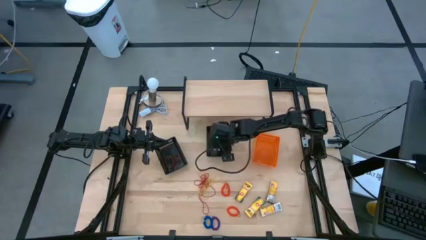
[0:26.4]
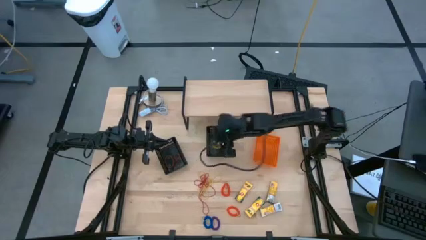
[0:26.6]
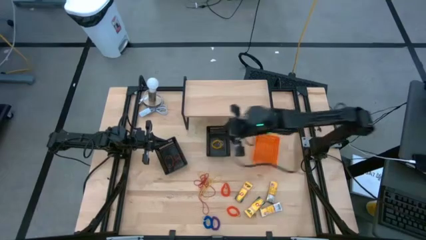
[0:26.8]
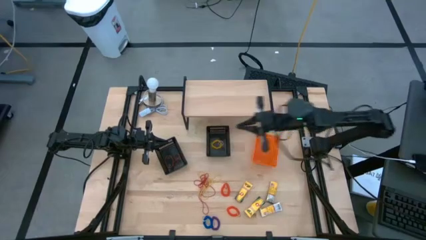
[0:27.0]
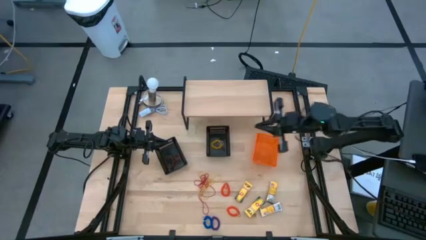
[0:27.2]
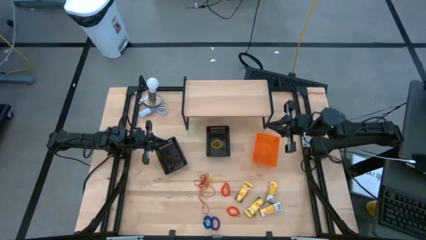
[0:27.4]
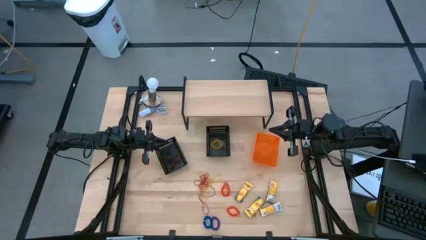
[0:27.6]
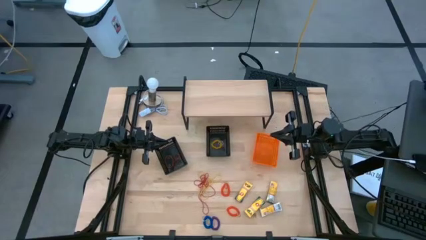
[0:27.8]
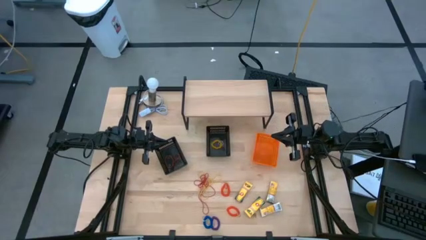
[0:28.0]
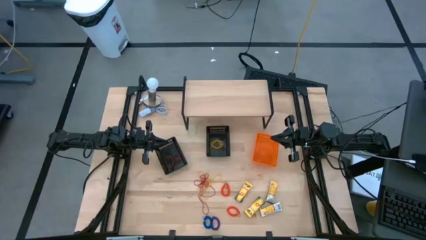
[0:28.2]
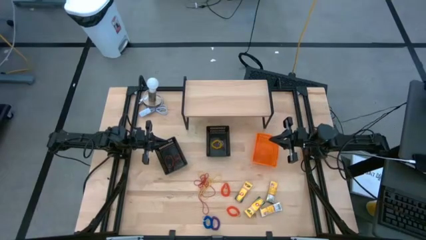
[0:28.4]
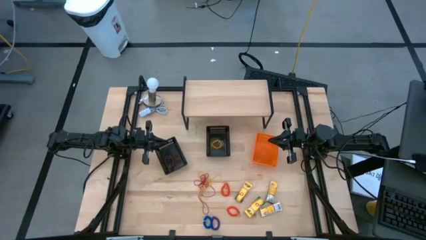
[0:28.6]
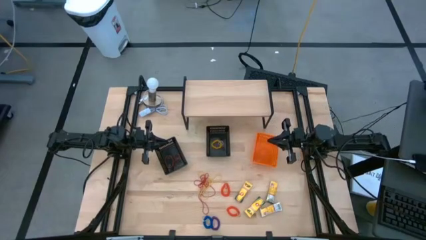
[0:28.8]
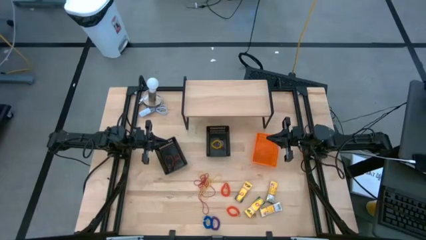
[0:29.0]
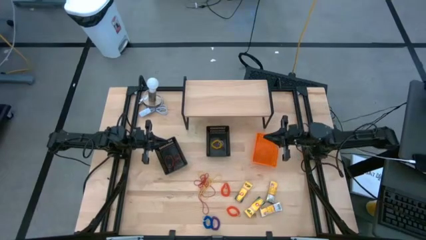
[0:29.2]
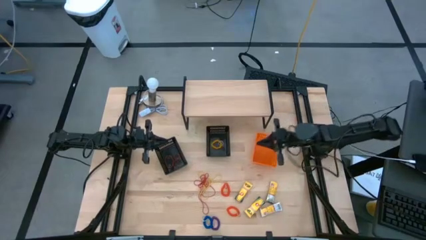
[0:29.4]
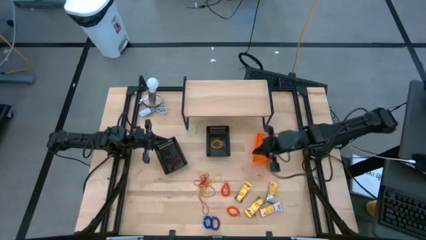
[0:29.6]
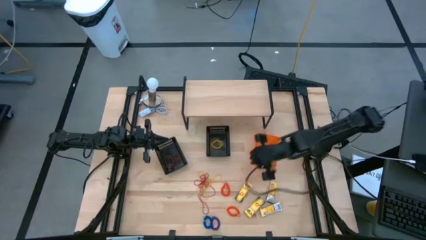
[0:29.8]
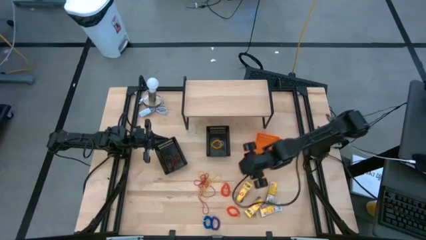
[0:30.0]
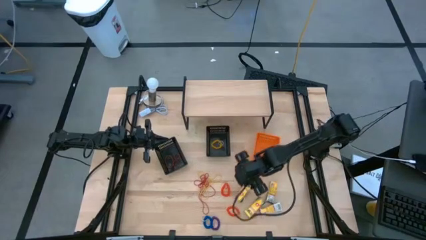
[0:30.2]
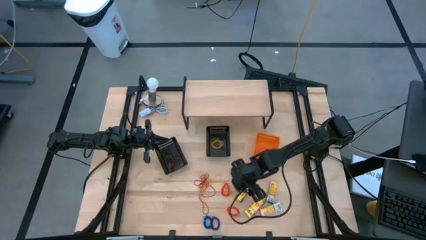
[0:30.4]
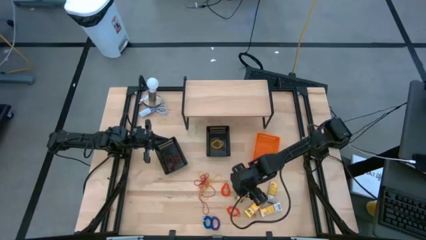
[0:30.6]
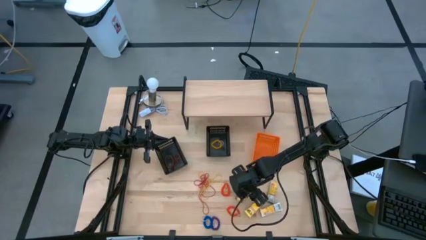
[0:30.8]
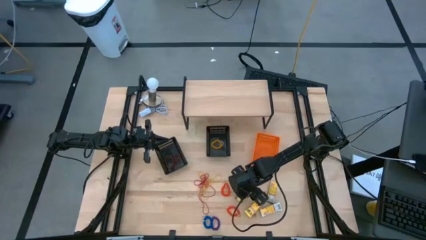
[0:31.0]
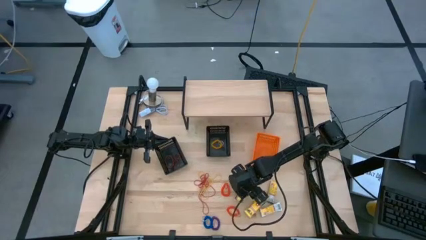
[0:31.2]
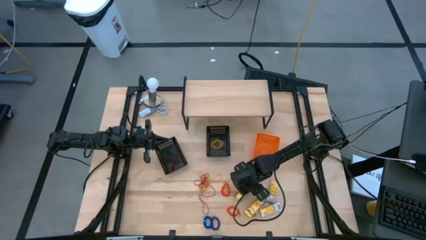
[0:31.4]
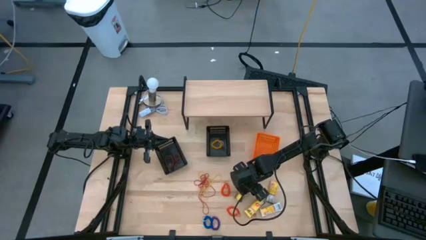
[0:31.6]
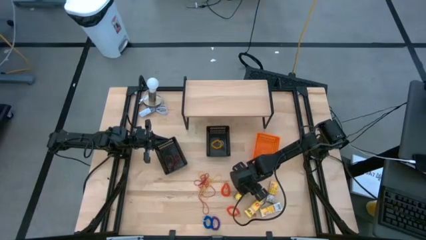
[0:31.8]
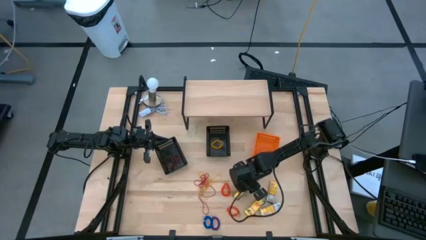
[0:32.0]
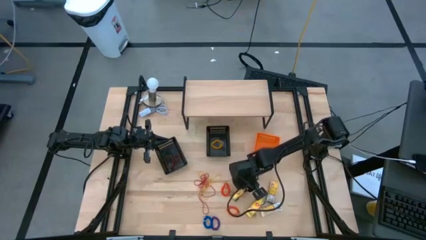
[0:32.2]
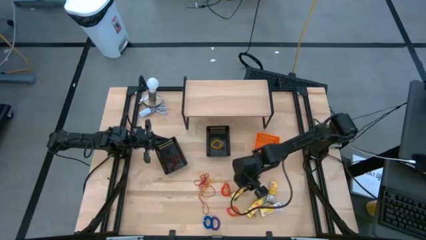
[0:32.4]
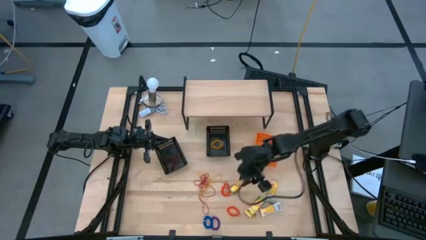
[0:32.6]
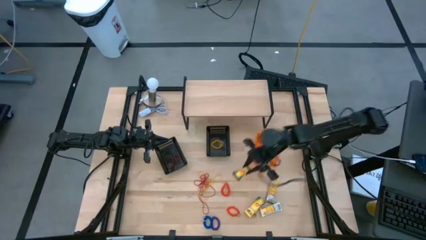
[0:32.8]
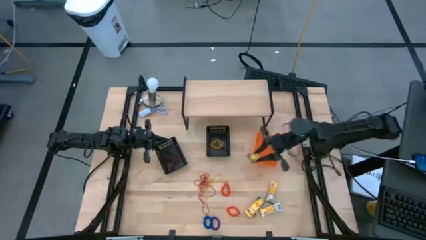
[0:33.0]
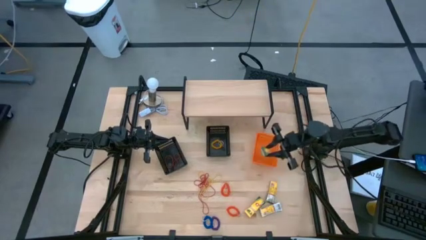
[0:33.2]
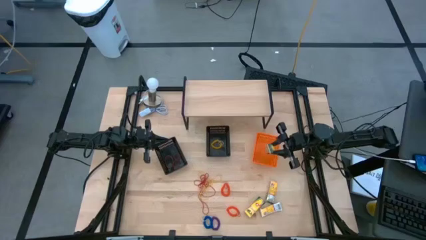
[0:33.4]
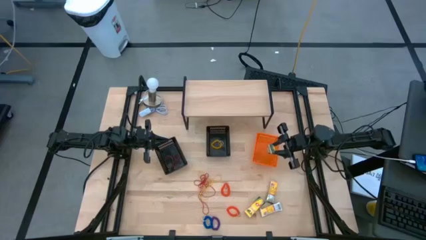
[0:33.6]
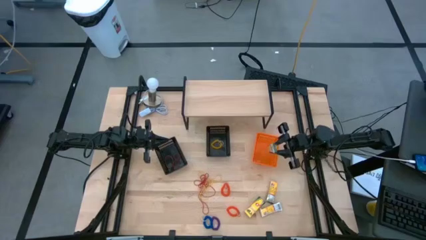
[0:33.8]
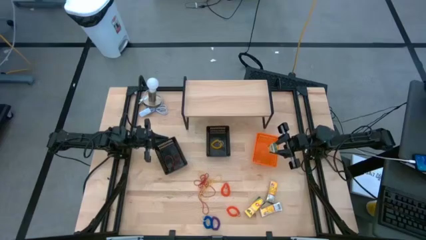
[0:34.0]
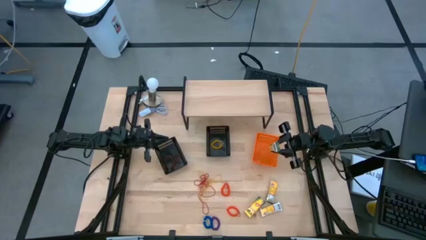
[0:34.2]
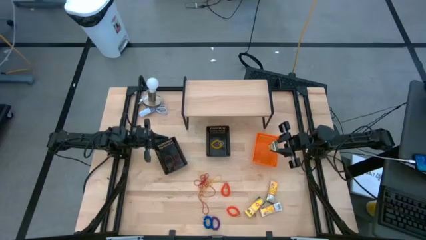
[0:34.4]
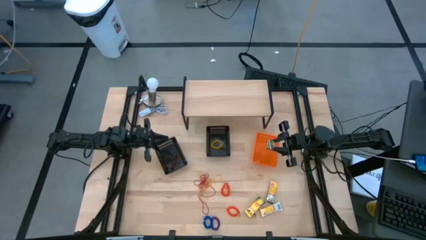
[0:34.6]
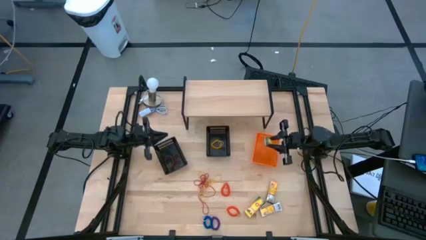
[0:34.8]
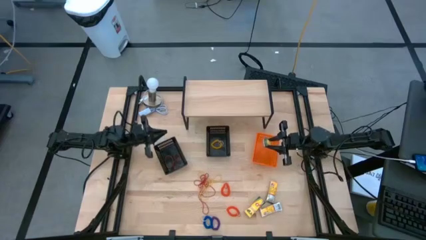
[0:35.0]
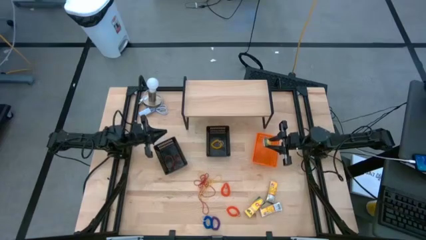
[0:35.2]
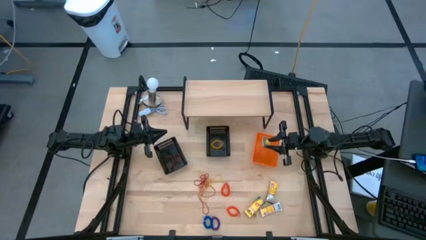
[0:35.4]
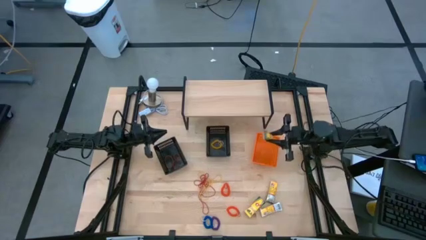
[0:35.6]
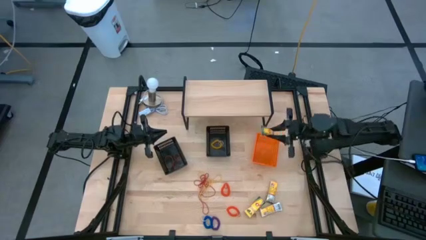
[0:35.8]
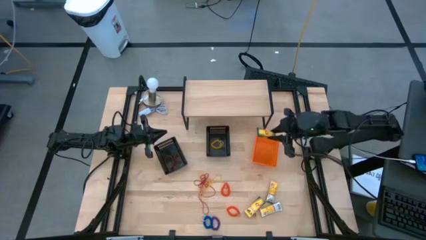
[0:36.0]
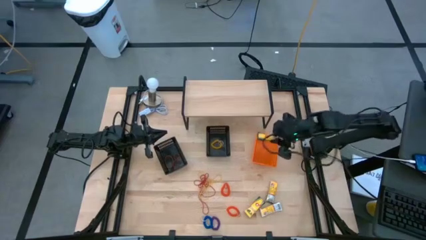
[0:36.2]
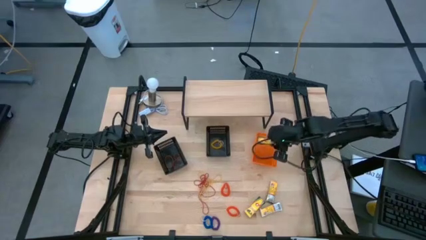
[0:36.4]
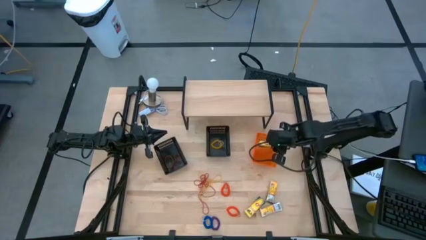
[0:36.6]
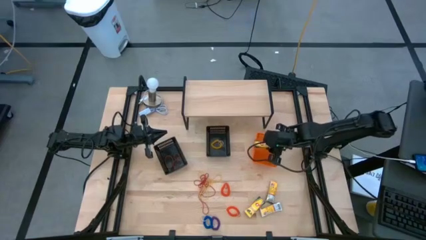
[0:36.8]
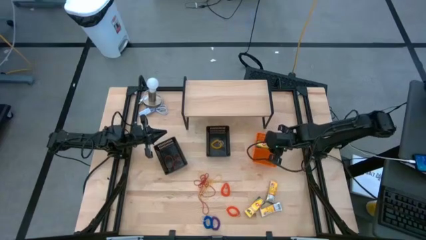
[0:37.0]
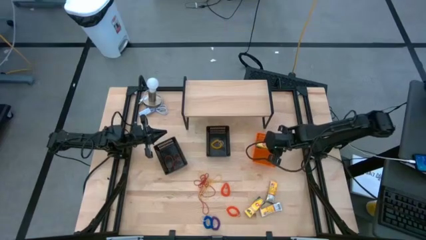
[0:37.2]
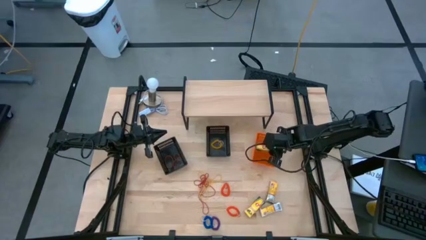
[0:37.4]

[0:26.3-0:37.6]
Task: Pick & Place Office Desk Supplies
Put the crayon box into the orange basket
